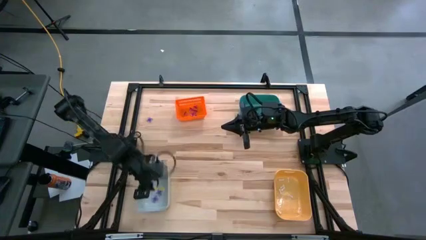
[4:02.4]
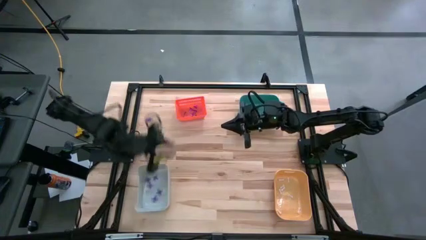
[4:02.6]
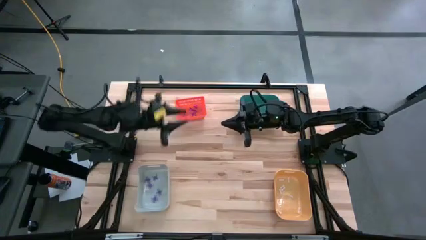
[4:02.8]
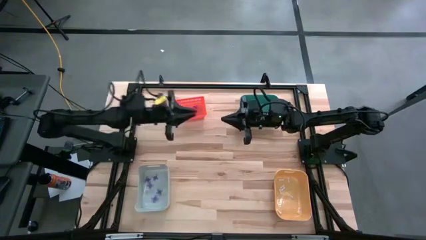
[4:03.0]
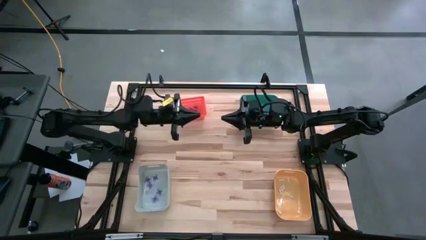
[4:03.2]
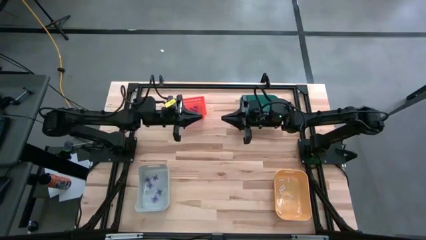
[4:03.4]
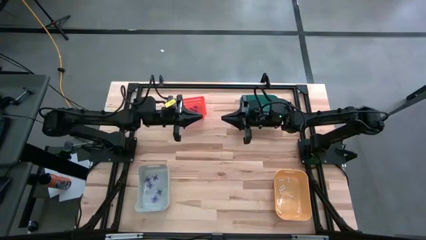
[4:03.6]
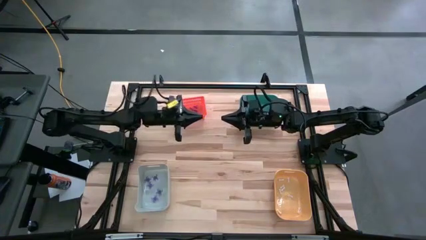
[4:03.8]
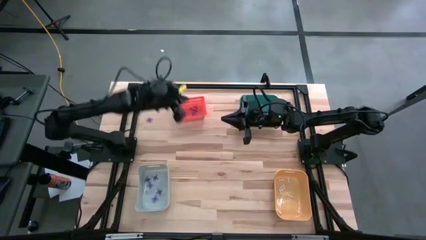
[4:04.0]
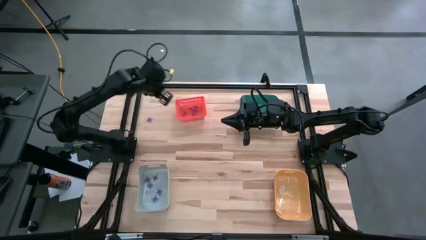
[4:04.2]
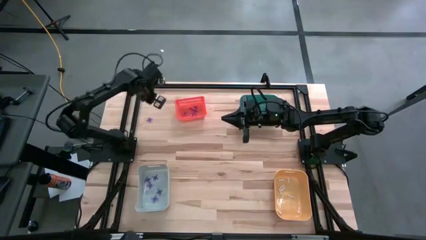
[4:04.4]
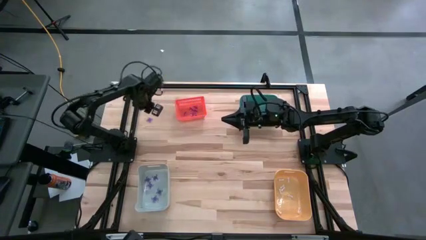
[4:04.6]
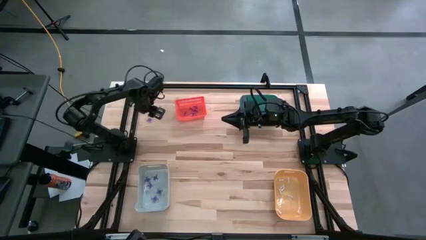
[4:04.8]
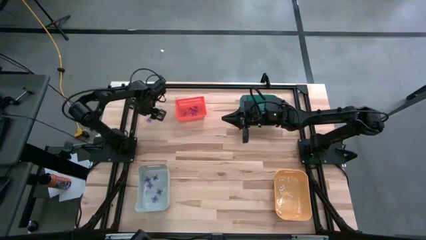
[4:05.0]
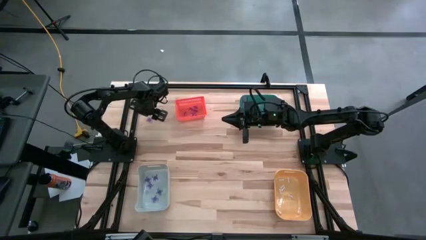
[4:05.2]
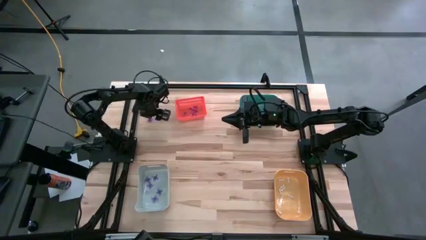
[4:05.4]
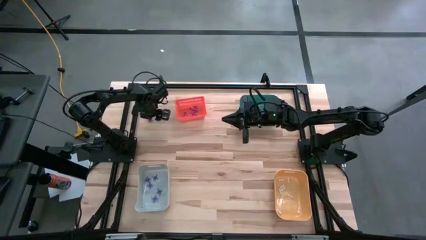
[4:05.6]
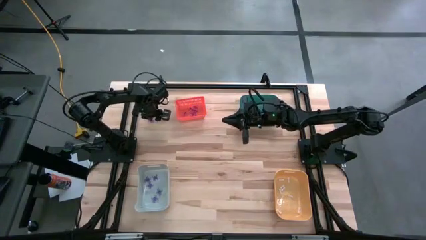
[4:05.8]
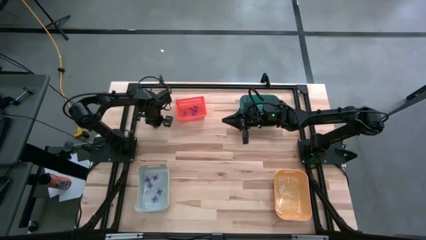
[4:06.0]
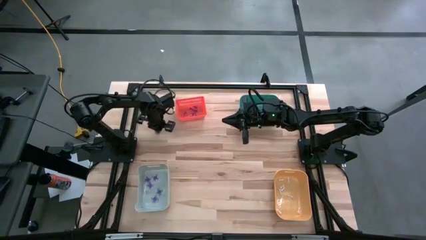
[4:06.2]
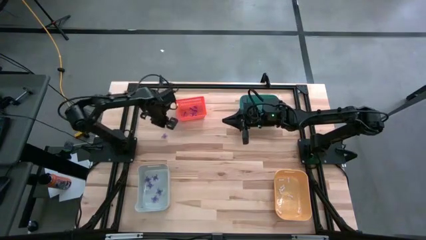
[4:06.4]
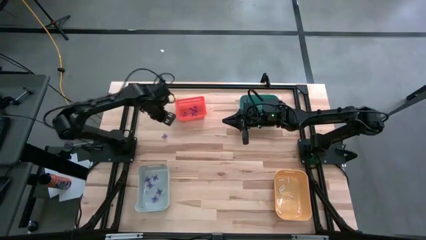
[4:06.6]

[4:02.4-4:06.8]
Task: Sort Halloween decoration
Put the purple spider toy into the white bin

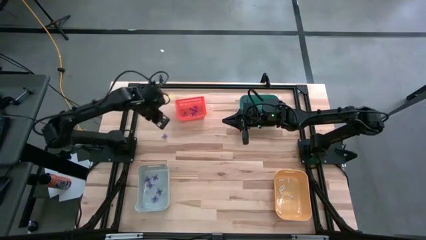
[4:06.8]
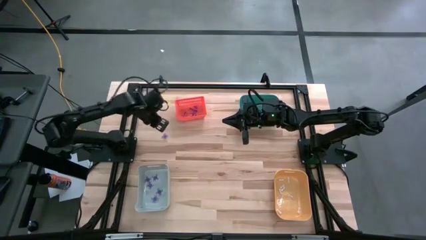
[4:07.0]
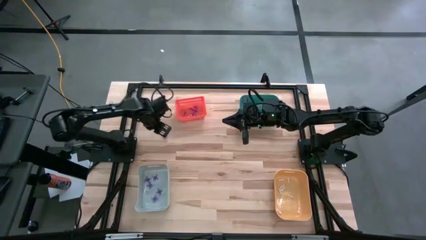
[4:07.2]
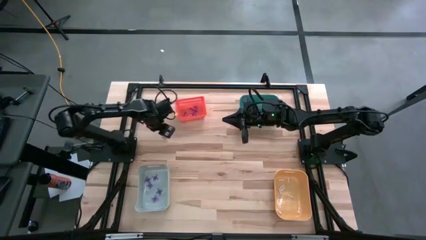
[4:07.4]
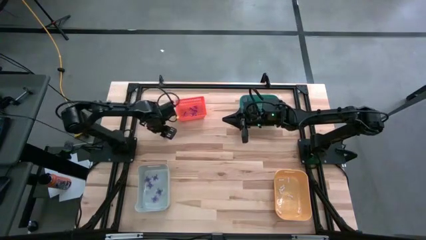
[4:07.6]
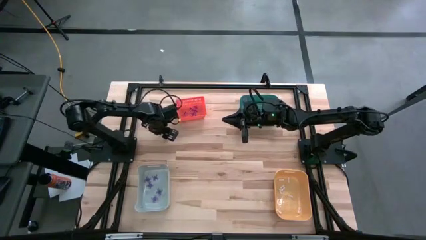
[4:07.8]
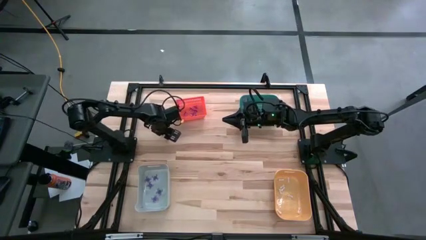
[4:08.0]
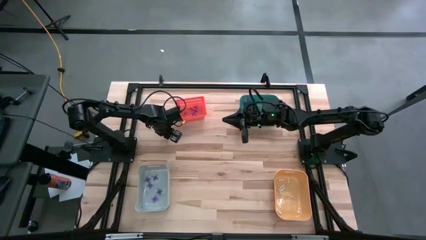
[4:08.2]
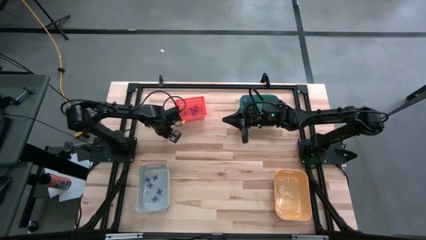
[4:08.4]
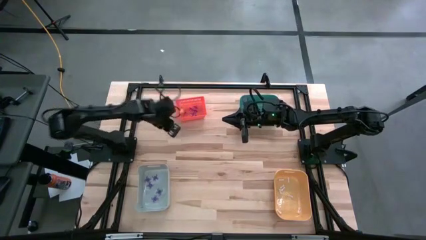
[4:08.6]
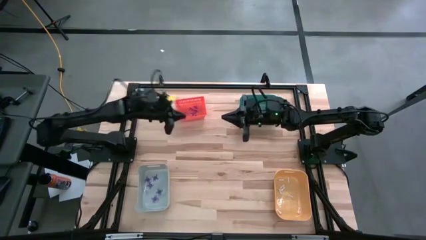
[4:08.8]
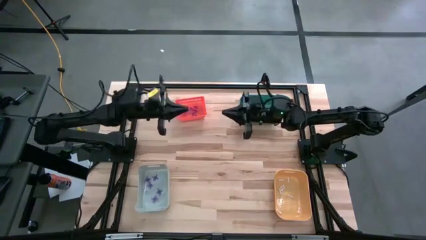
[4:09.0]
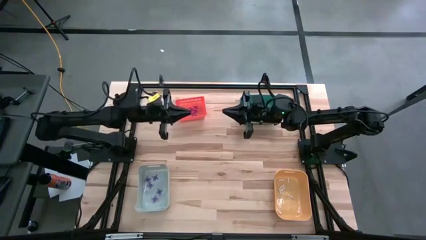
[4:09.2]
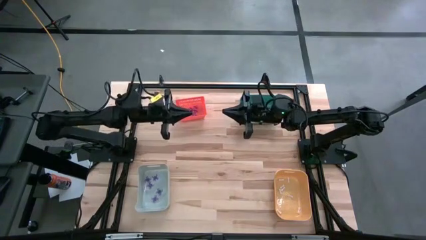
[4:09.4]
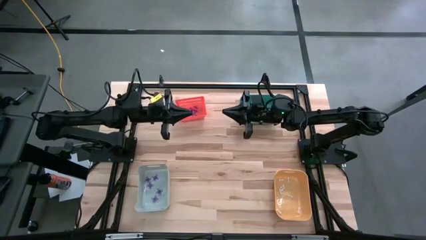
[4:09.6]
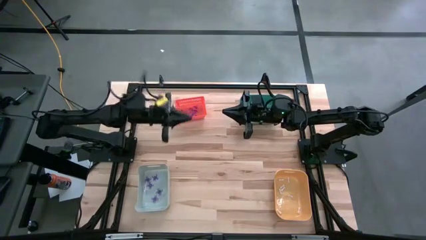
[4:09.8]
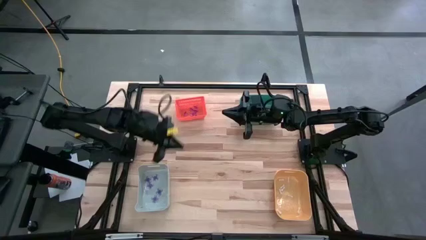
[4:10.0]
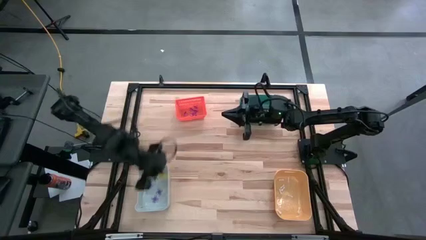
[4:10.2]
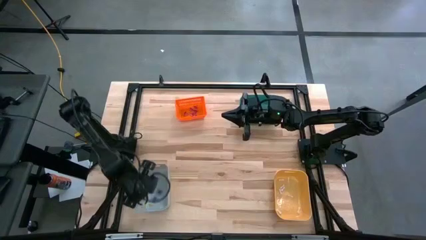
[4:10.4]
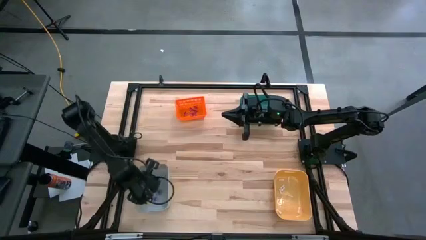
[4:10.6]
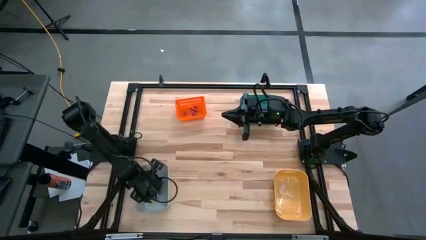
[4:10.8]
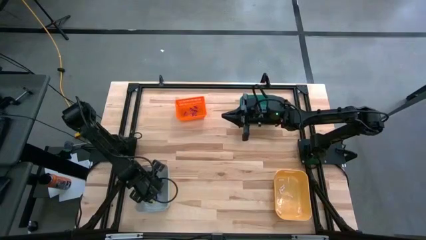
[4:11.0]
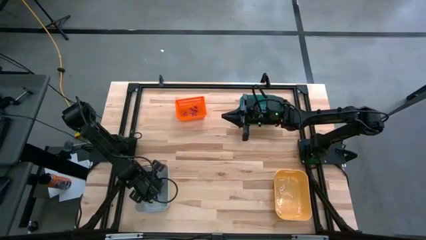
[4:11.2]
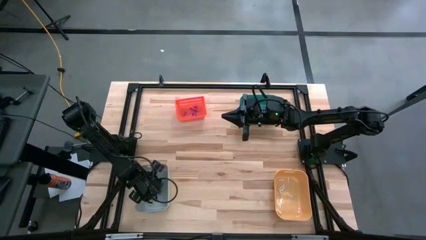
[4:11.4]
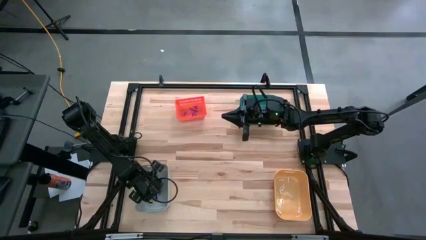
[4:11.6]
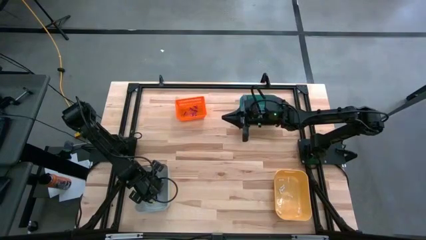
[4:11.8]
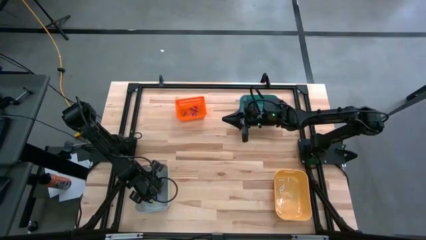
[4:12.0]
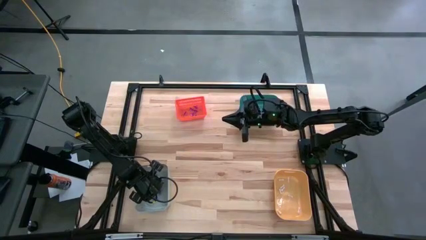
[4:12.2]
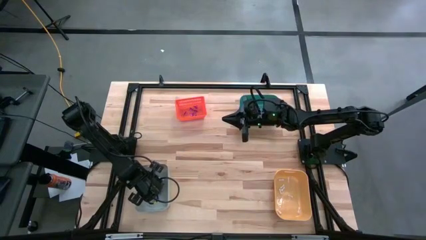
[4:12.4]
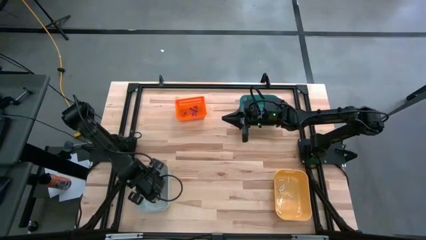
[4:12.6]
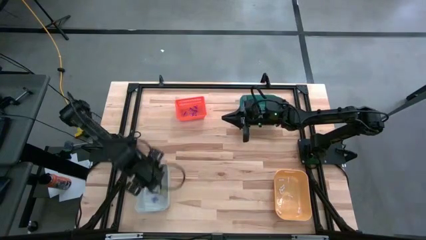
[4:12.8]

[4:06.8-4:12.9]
Put the purple spider toy into the white bin

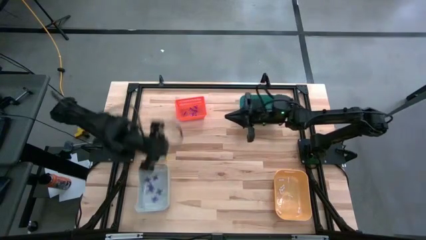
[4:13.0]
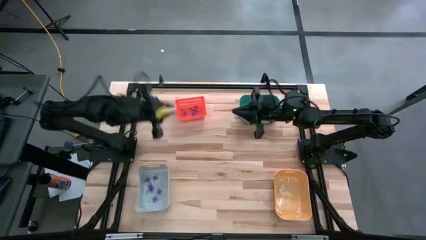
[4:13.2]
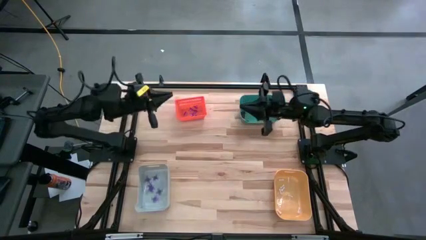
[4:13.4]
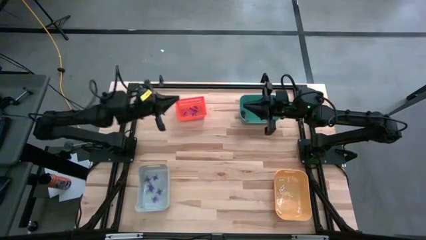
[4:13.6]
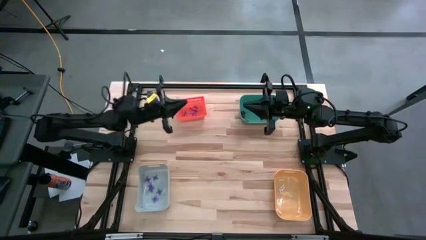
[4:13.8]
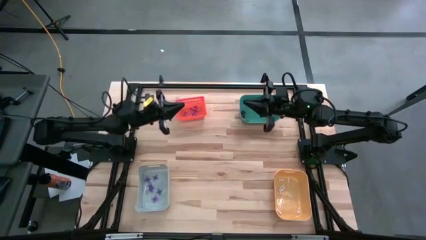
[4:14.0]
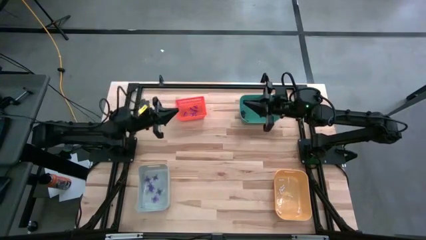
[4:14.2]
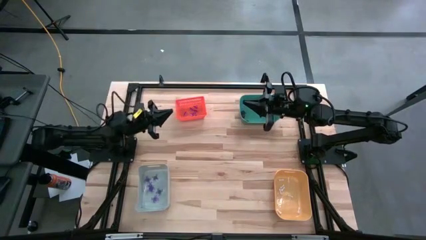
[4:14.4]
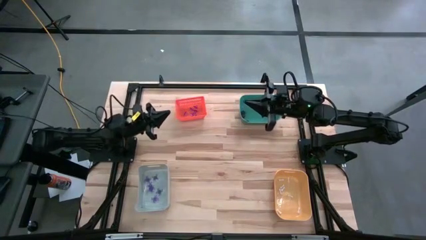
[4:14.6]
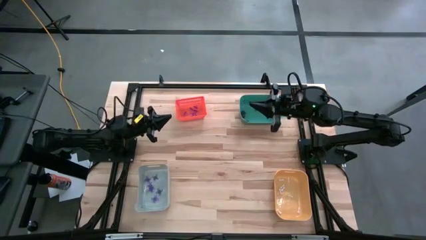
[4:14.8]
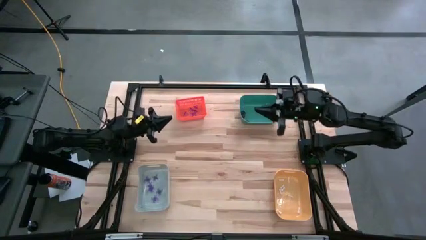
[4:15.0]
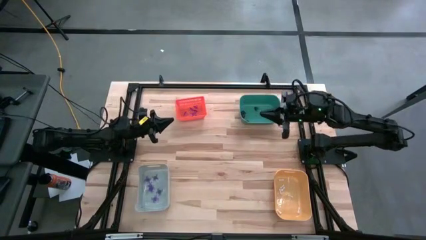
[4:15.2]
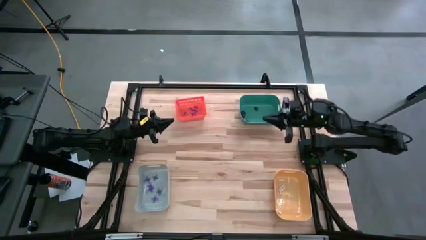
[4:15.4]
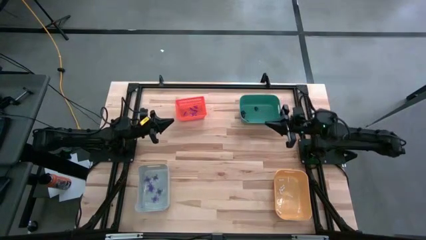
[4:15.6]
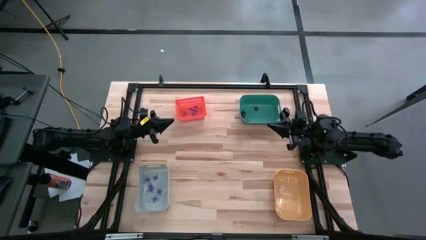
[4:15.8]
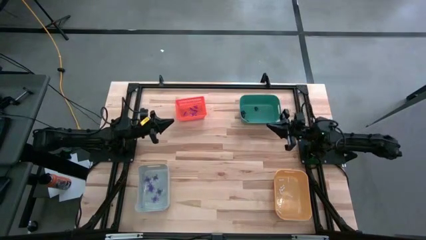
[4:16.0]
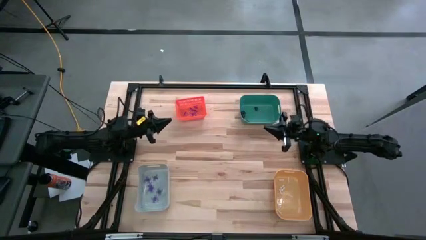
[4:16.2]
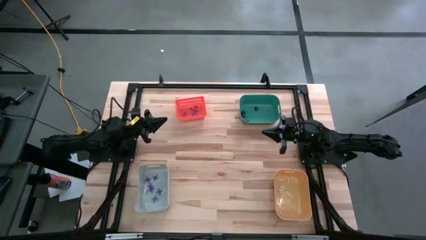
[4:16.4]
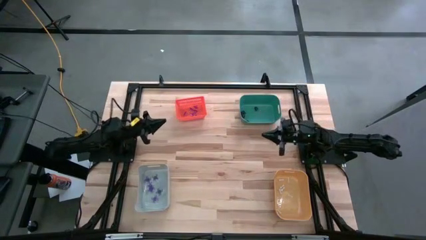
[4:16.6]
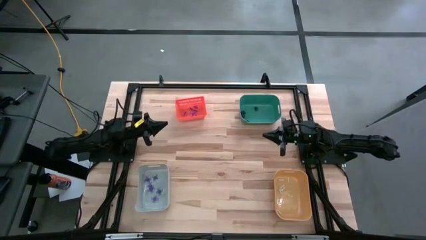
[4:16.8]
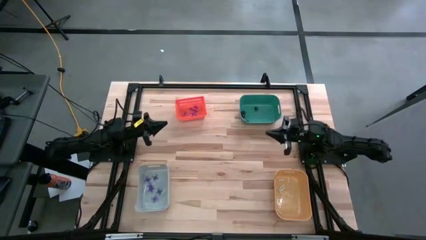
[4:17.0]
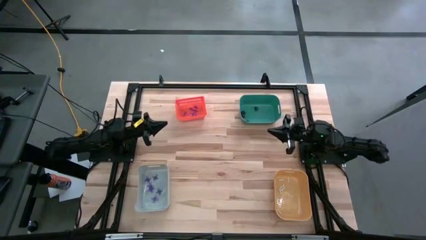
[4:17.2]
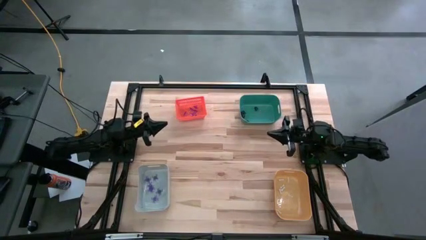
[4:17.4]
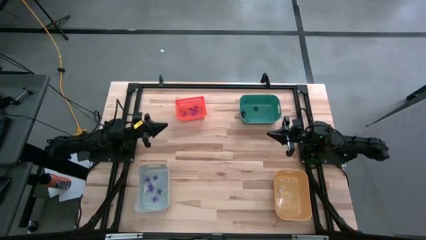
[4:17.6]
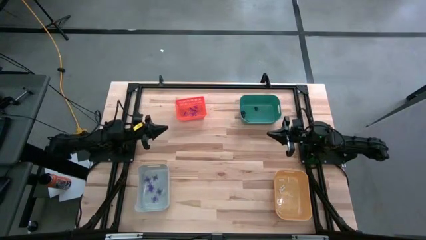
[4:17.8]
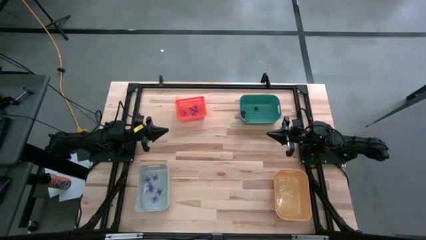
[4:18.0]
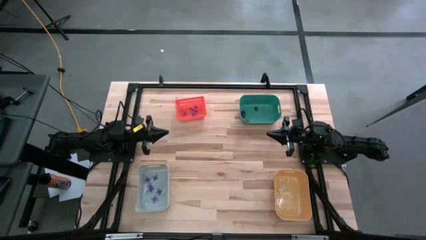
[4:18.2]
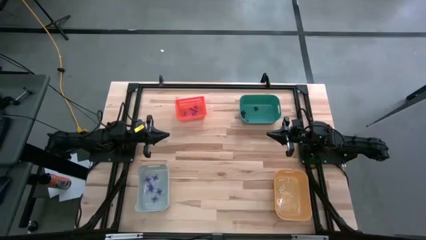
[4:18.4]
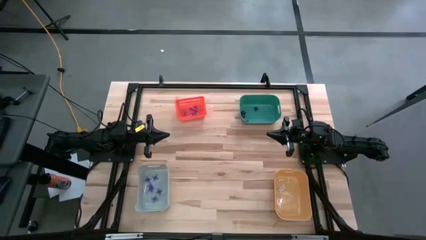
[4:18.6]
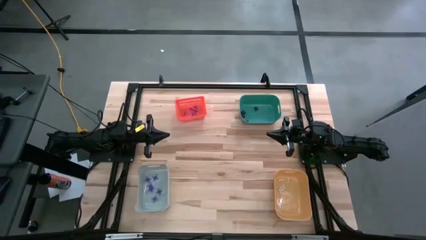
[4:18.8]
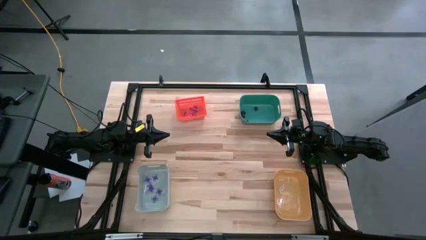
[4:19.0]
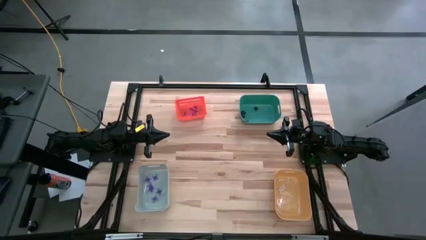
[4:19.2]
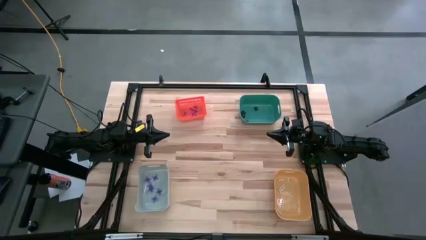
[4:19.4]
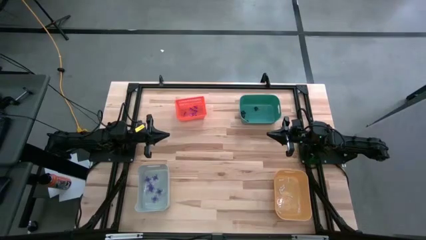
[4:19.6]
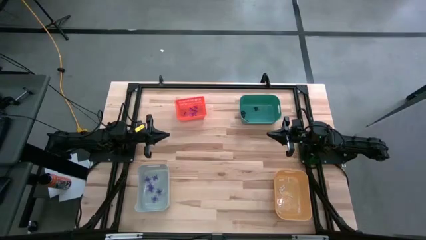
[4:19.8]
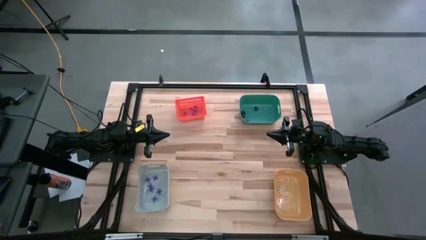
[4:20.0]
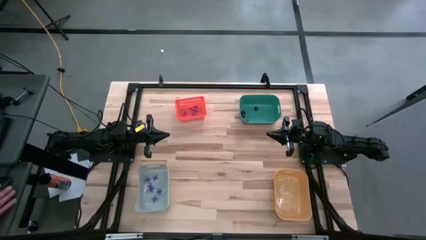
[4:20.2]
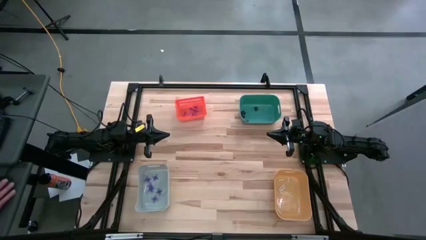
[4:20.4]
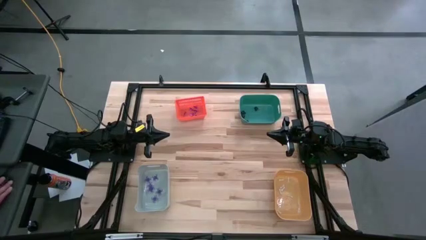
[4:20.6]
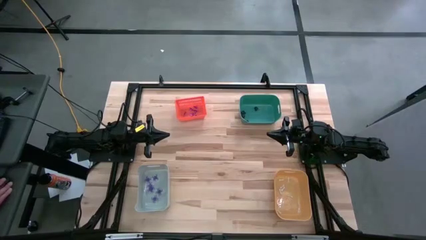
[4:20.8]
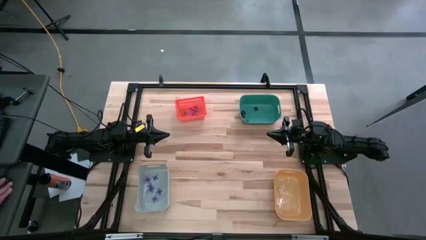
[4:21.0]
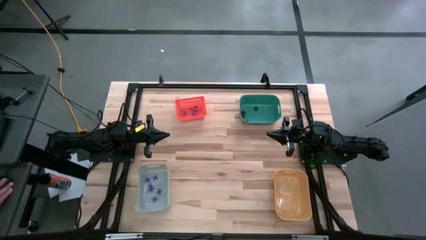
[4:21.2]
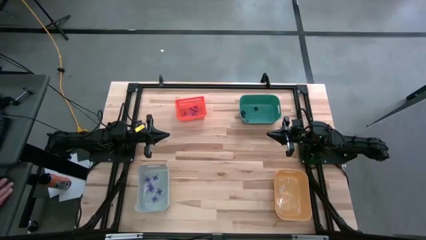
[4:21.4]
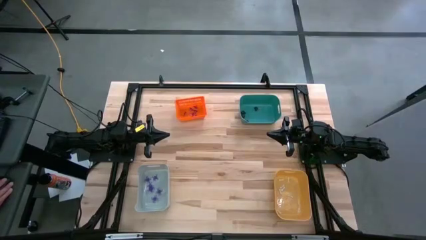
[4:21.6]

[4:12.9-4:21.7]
Return to Home Position
